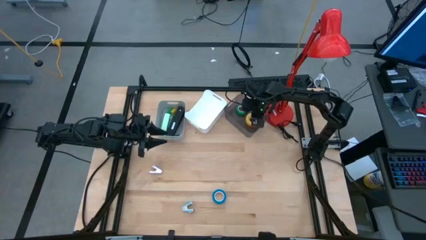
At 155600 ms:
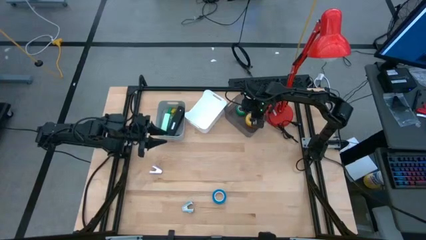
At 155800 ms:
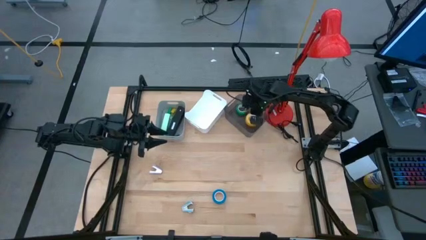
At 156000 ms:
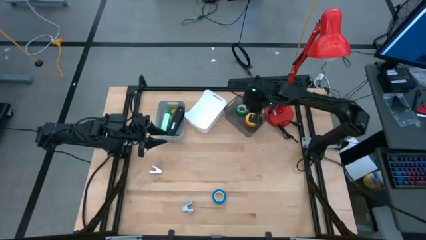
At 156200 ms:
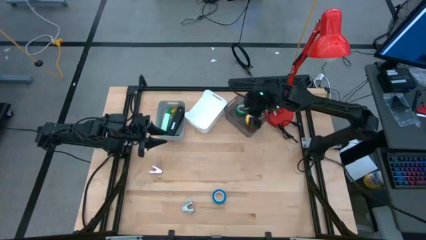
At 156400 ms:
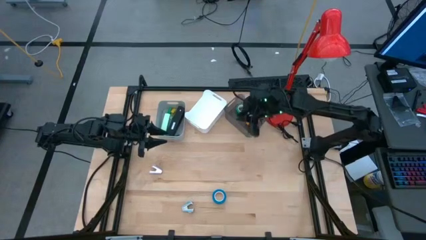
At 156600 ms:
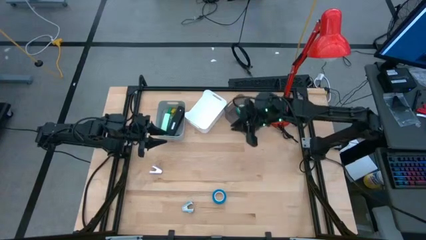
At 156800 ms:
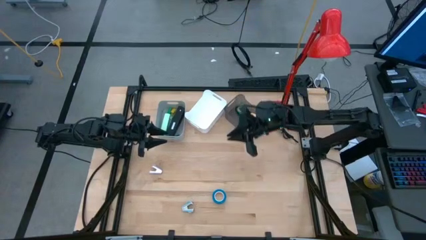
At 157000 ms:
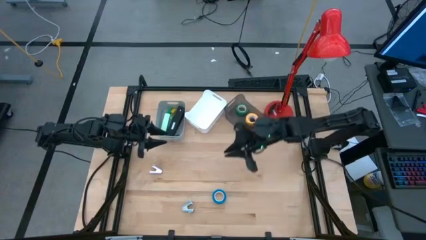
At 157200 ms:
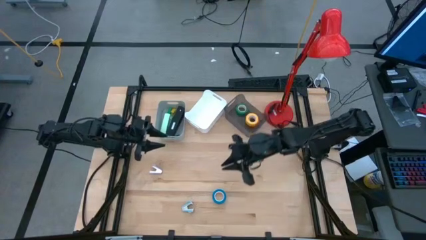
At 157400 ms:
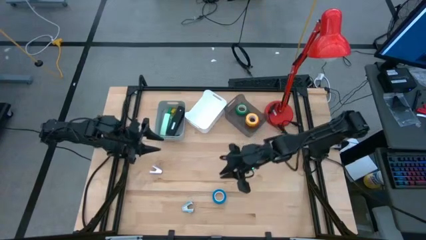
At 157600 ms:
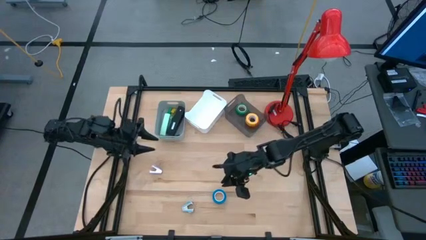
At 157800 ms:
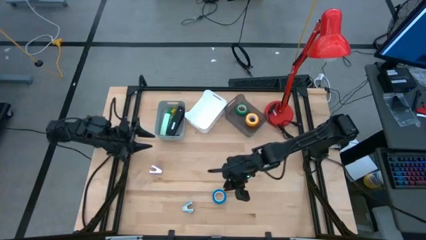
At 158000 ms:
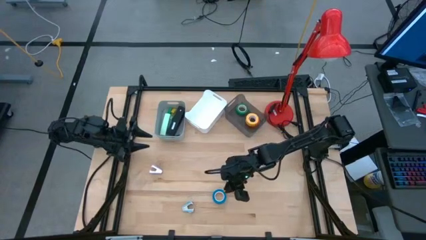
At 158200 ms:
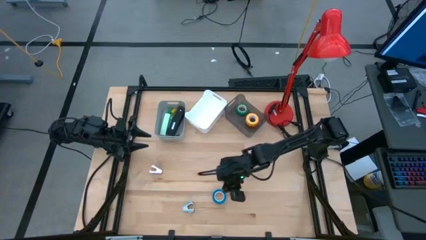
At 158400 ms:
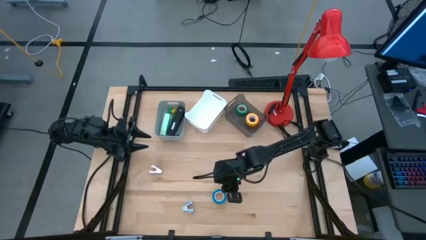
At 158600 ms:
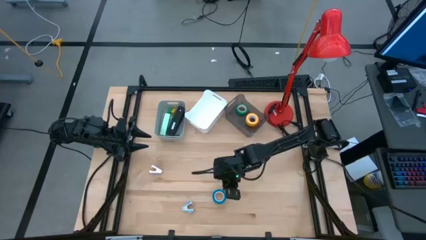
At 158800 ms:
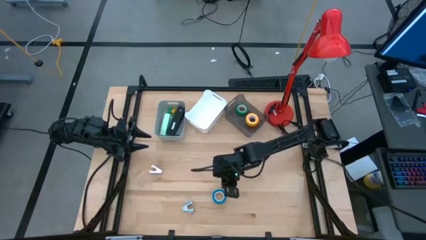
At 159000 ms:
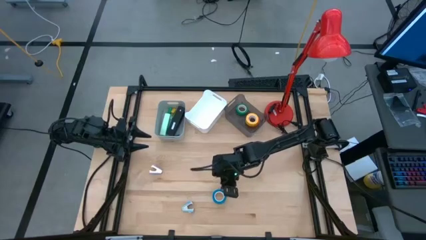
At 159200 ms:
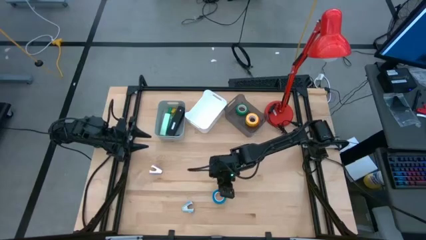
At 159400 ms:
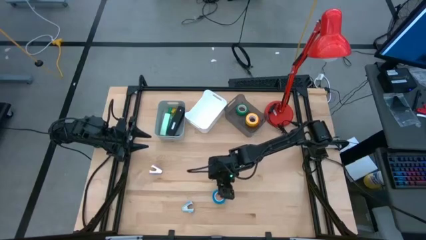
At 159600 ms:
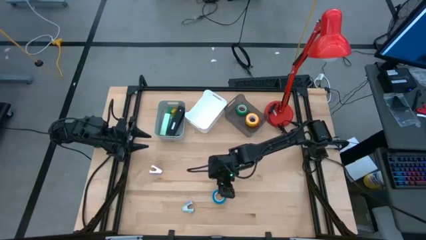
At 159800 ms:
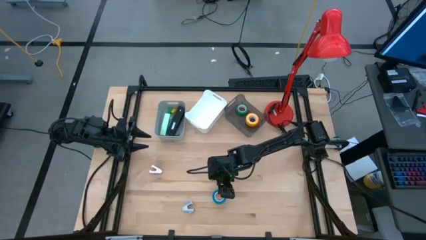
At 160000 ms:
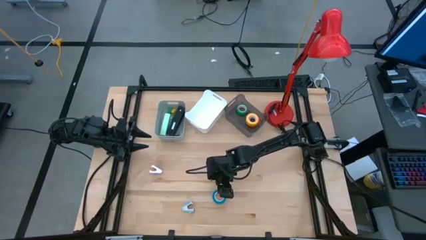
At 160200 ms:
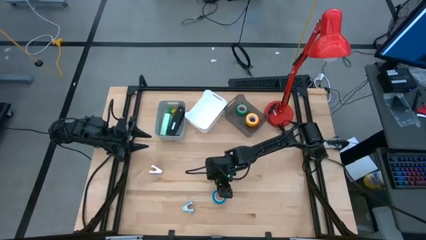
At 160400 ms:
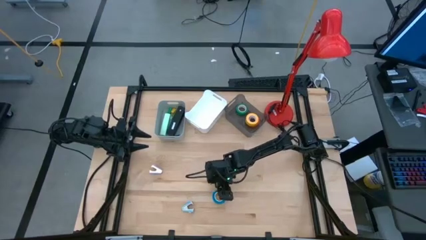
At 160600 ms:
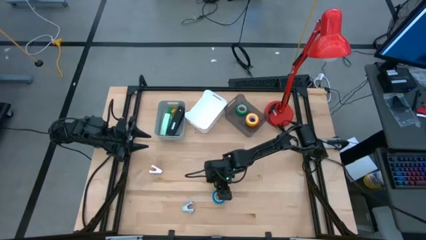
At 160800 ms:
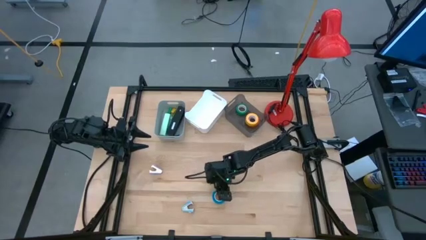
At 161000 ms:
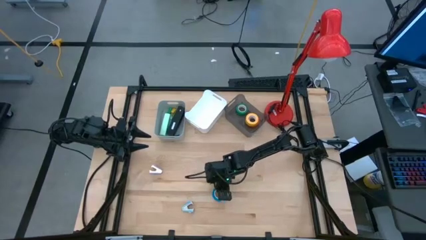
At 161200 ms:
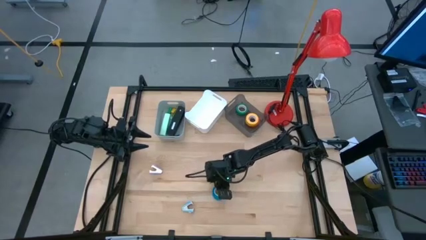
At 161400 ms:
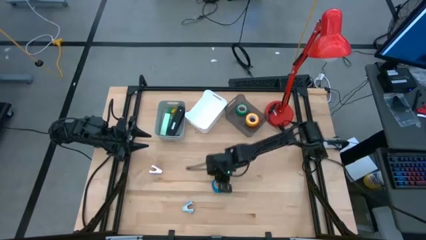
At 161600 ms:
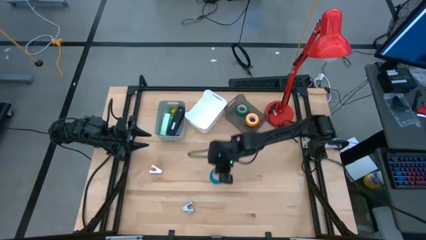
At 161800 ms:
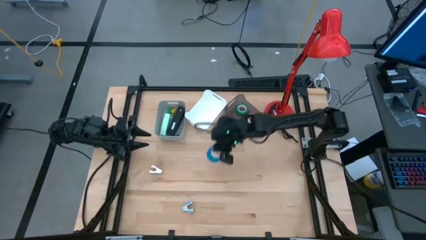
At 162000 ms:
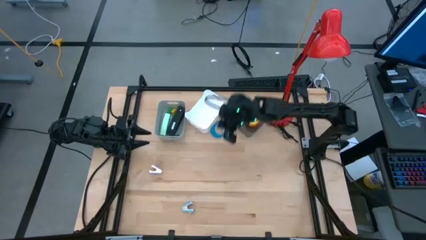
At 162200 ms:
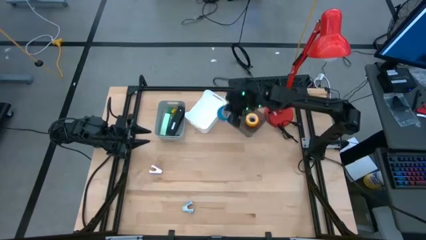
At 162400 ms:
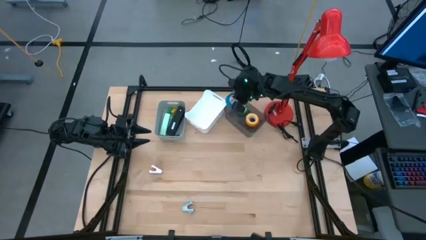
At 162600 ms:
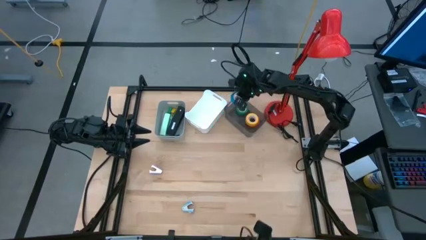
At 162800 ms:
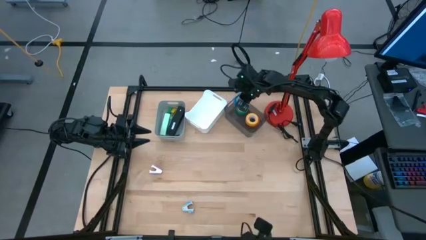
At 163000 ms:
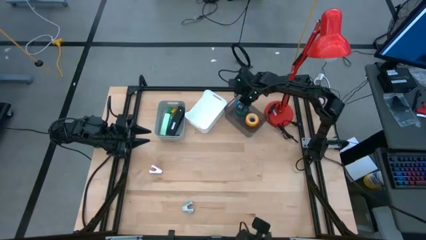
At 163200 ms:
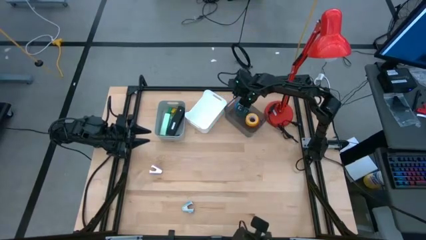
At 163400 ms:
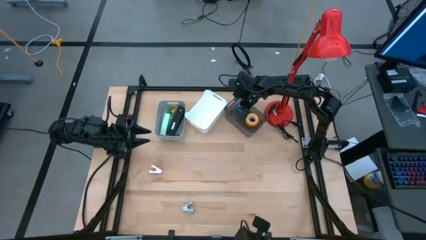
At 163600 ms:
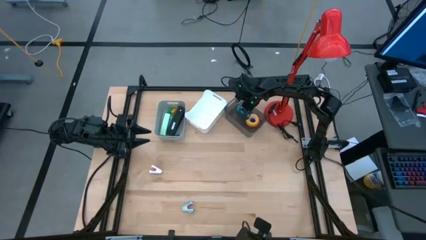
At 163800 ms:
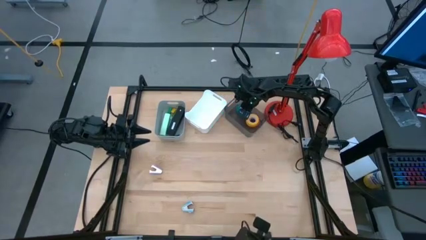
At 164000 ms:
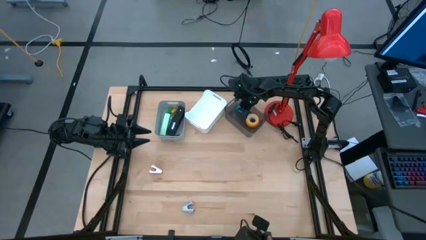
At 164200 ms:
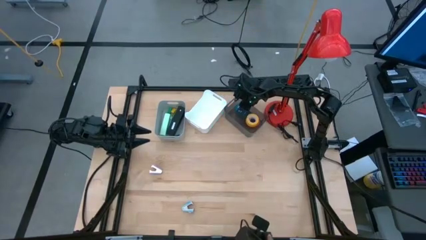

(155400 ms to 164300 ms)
Task: Pick and place Stapler, Stapler remover, tape
Put the blue tape into the black bin

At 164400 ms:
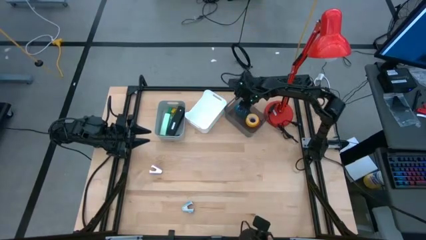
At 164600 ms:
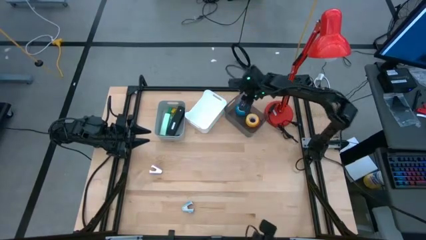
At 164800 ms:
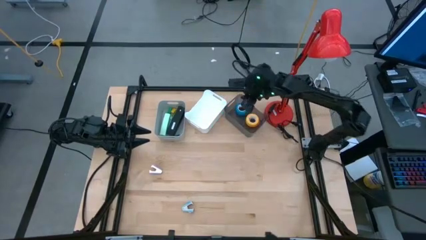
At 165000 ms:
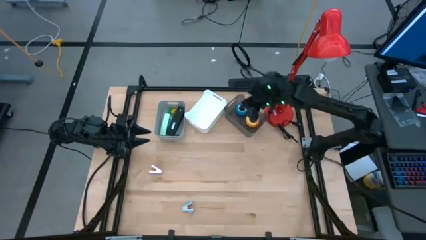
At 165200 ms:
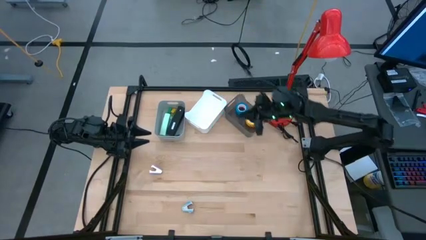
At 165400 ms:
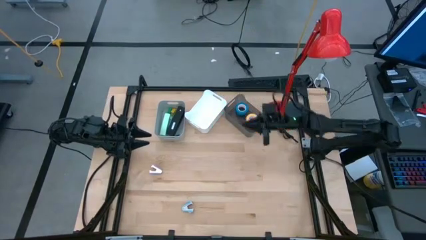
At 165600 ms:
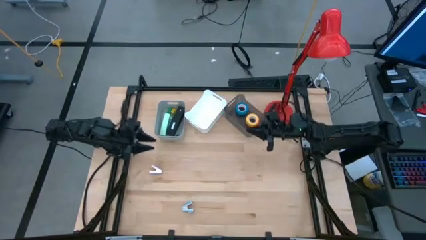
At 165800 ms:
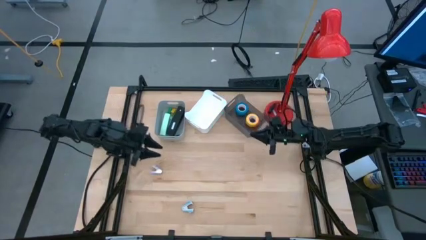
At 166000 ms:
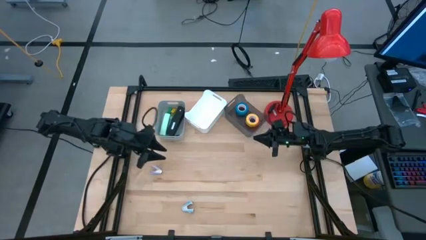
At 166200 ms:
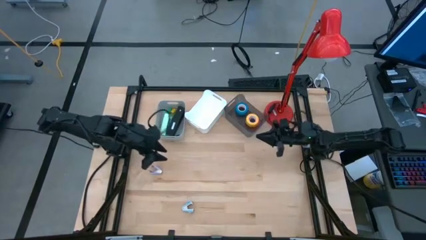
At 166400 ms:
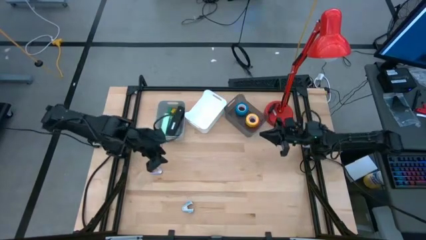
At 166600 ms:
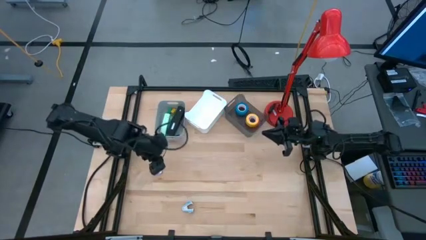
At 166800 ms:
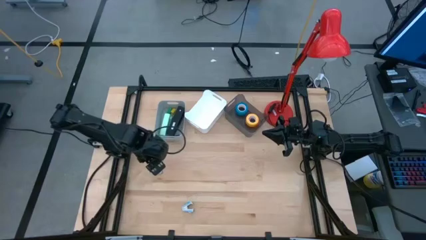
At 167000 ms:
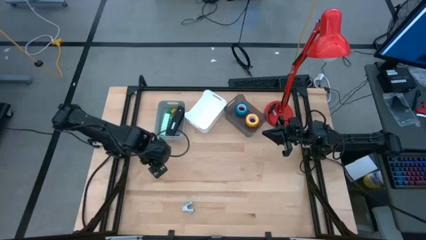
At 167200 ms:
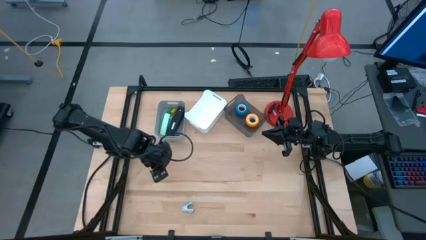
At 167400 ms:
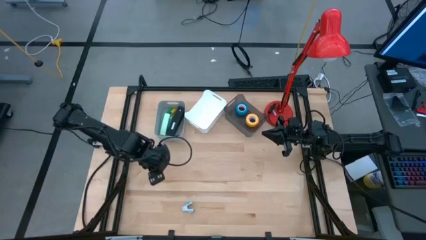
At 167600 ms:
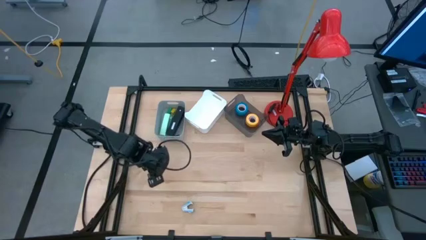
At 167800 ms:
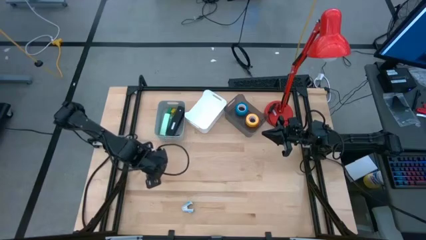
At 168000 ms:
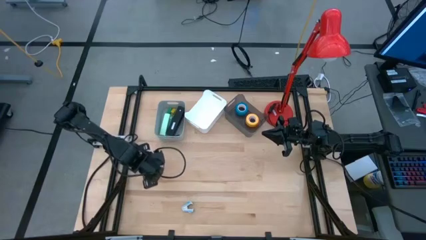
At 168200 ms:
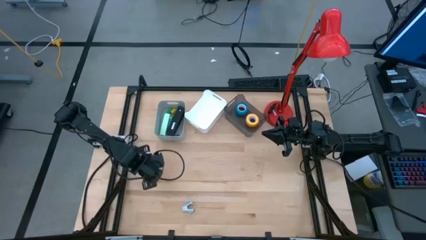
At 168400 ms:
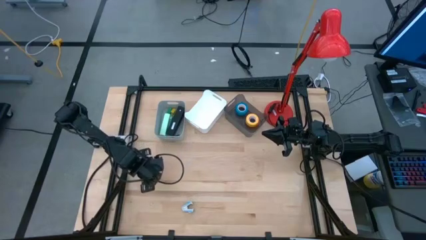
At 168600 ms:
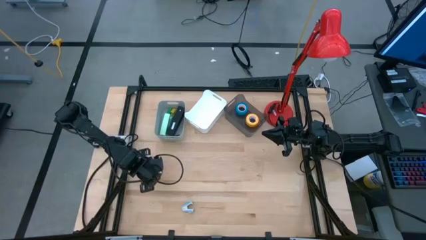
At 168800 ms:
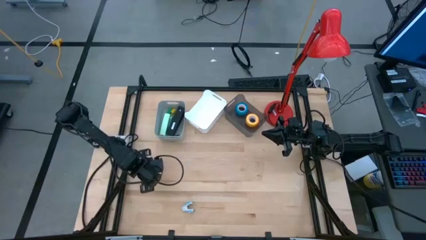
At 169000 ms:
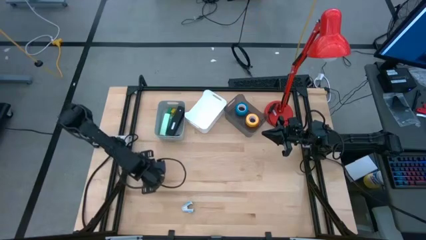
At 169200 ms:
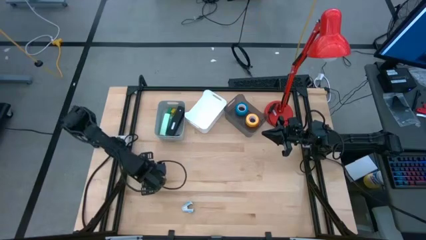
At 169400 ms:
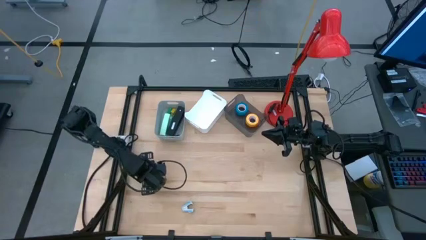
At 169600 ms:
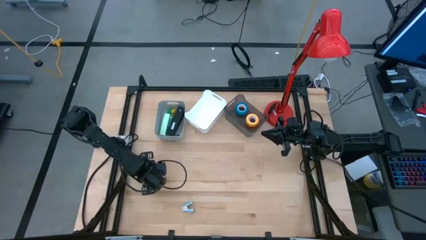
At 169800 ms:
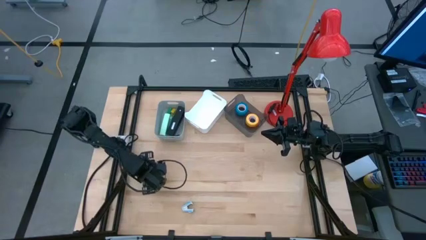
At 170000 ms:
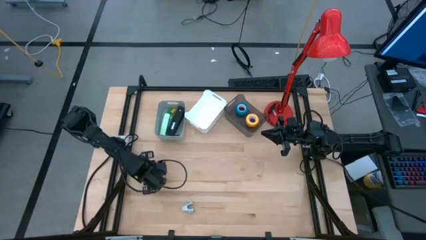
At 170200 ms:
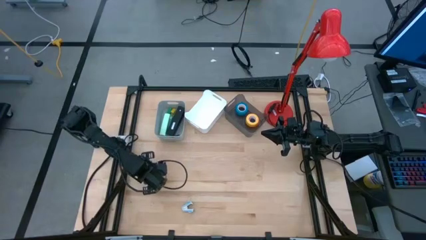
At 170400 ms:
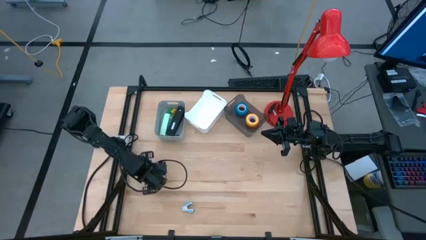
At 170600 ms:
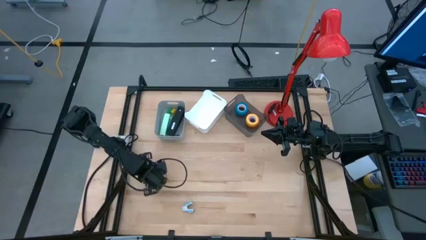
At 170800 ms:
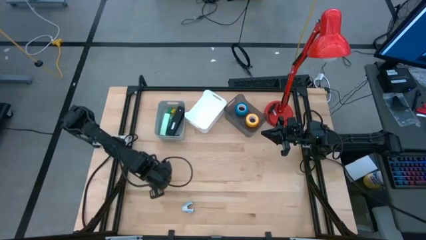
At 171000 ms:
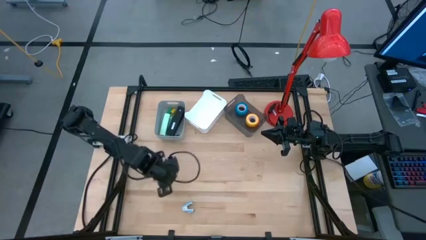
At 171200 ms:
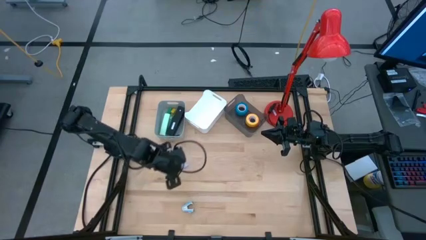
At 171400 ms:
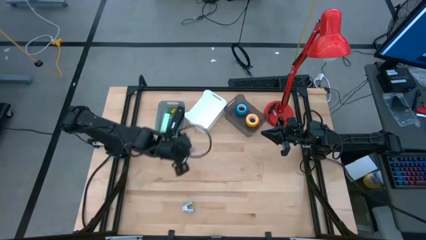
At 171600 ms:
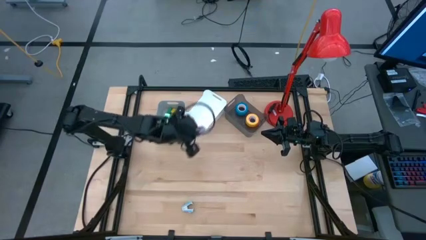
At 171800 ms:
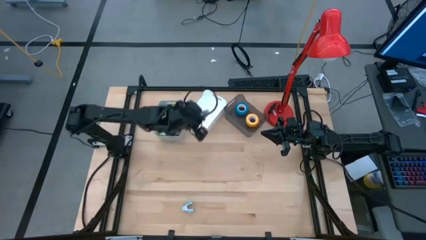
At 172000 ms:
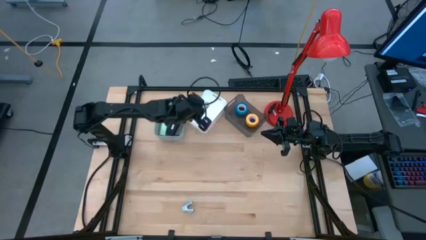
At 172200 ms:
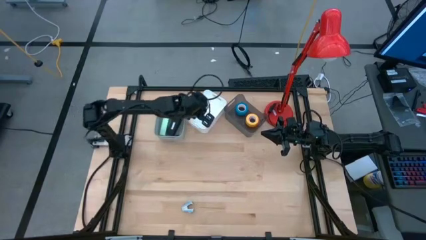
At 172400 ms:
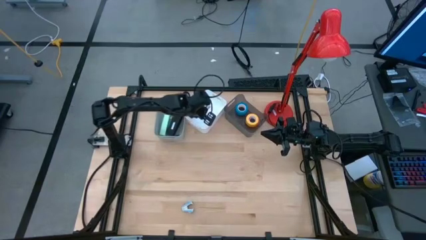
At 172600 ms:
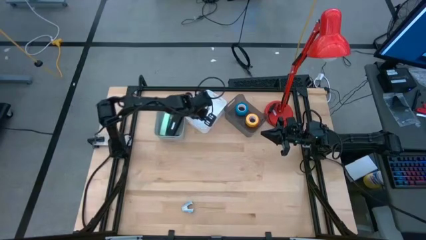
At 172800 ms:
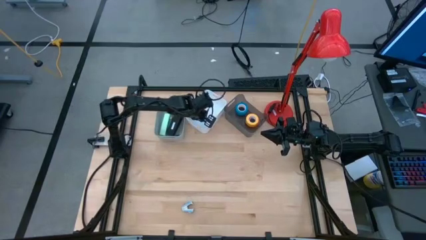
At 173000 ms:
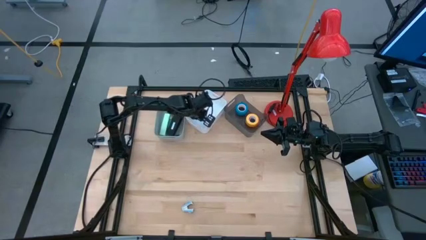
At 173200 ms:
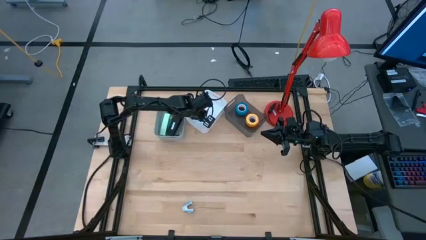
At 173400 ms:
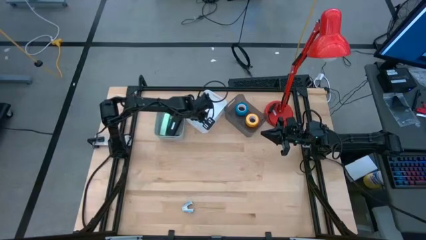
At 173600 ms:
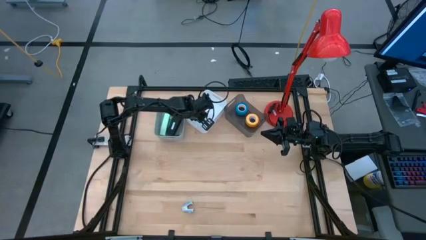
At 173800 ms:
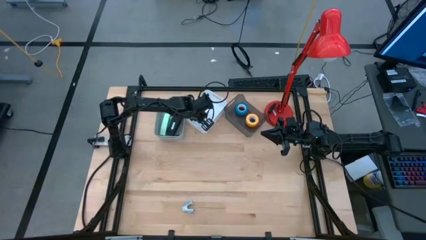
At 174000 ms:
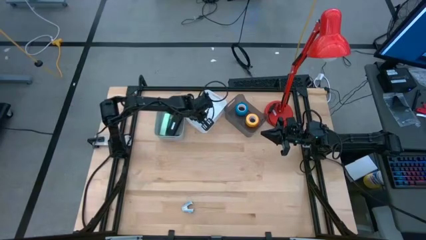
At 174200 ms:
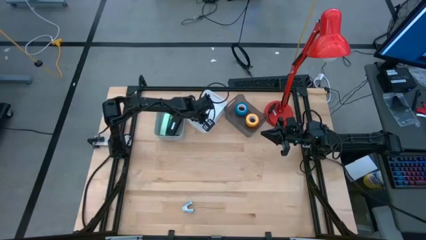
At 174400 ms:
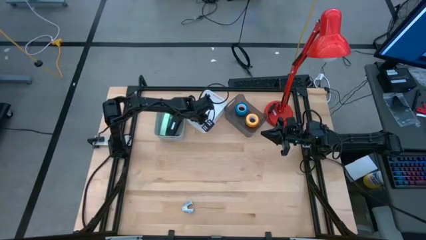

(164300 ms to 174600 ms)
Put the purple staple remover into the white bin
